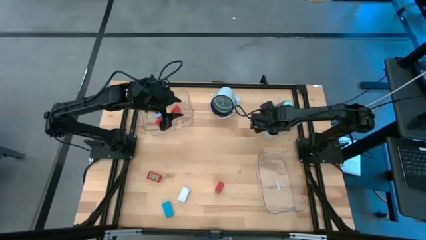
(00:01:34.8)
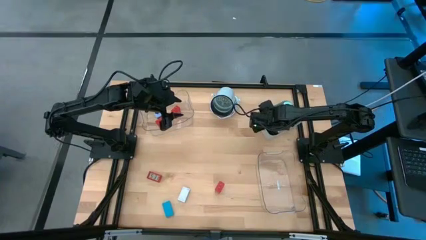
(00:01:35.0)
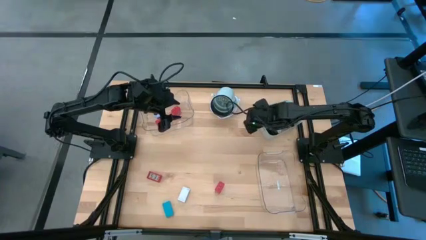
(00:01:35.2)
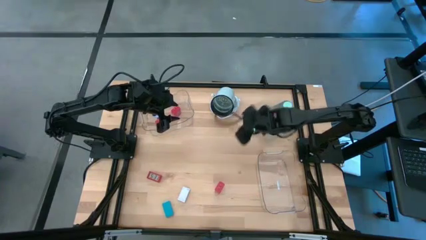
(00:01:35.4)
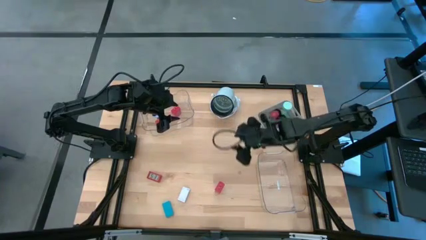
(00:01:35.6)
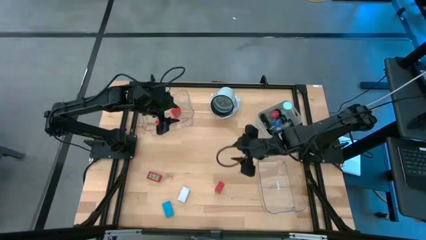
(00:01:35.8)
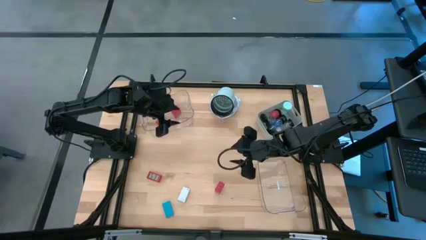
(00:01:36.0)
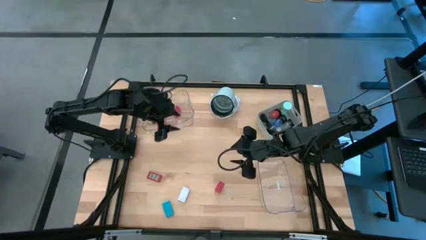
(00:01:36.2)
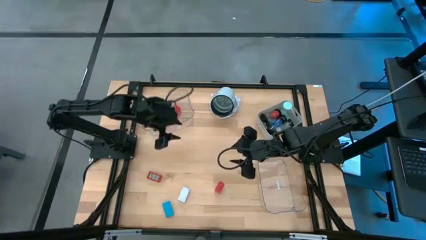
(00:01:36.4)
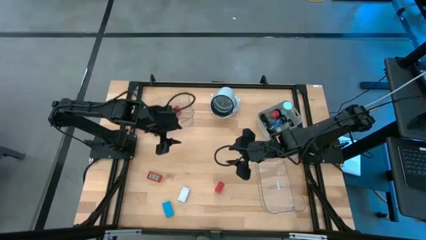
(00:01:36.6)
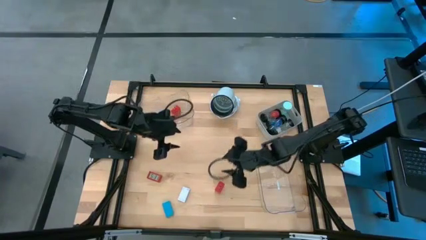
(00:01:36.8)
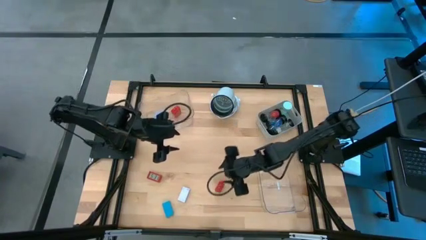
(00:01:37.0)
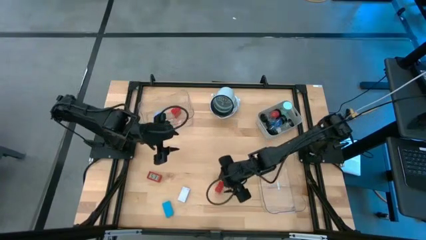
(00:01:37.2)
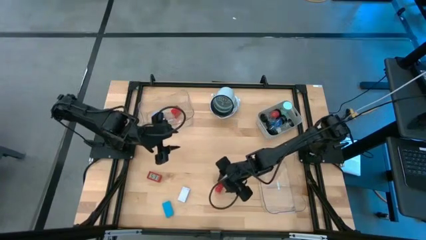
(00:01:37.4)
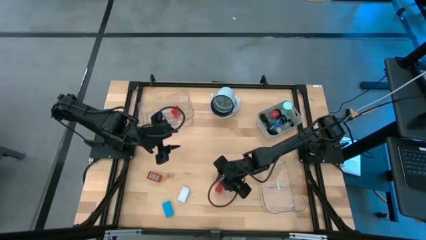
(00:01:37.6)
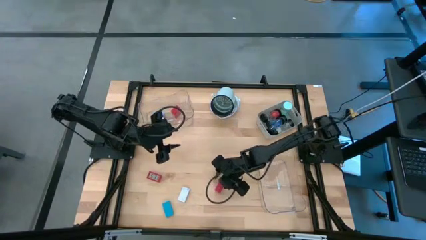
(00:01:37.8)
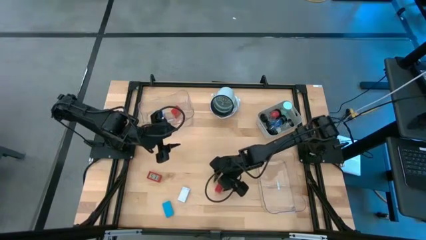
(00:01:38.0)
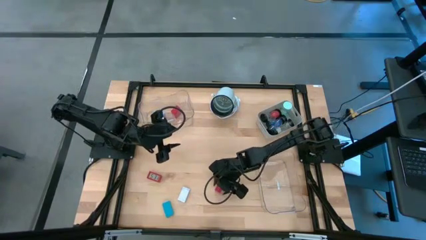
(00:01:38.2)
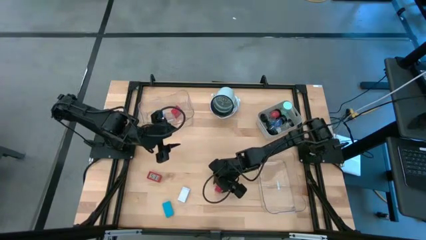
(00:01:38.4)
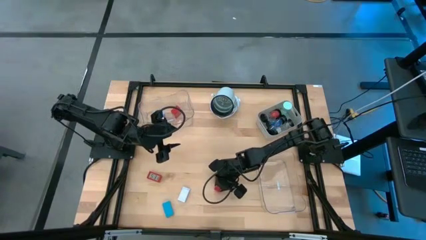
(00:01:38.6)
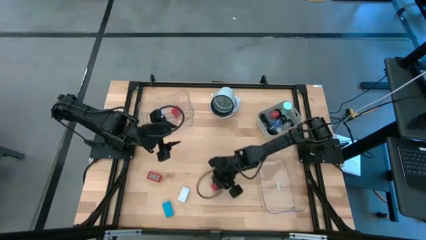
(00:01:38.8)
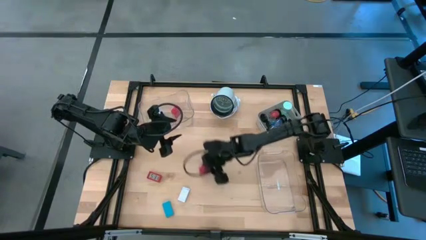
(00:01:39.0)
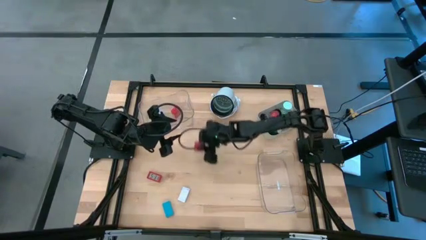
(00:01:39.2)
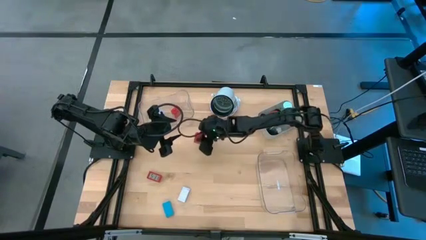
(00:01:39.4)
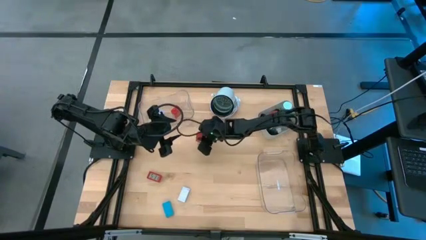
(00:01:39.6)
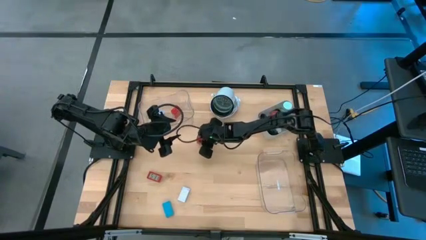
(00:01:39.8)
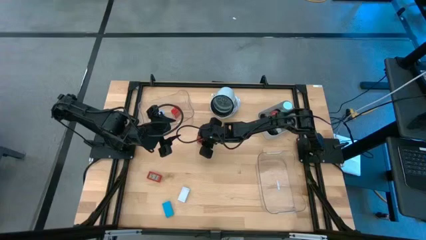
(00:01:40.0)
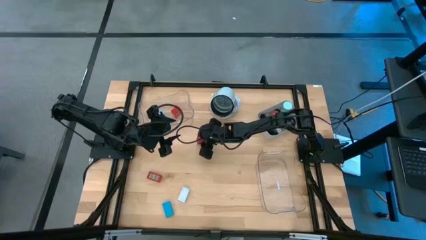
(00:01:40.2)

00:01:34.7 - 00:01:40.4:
Task: Pick & Place Office items
Move the red charger adapter to the top middle of the table

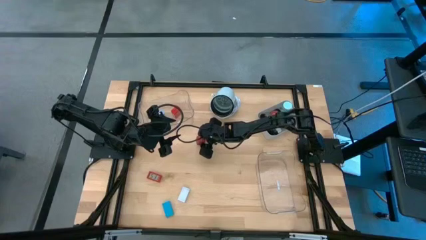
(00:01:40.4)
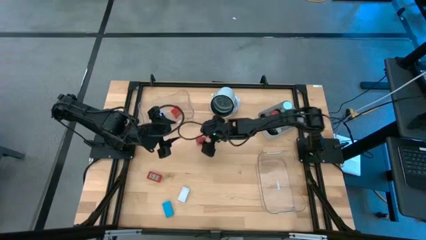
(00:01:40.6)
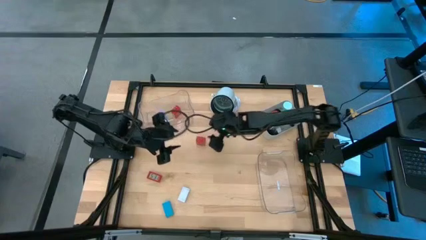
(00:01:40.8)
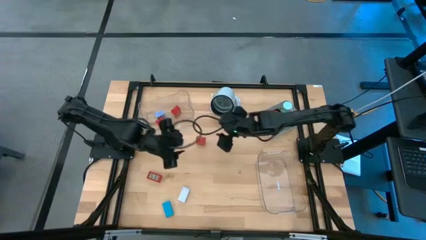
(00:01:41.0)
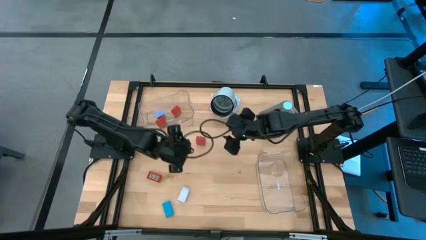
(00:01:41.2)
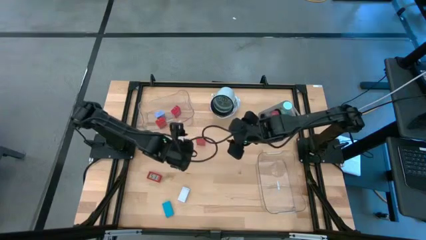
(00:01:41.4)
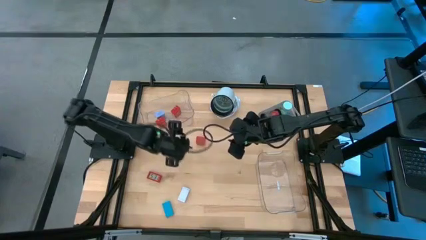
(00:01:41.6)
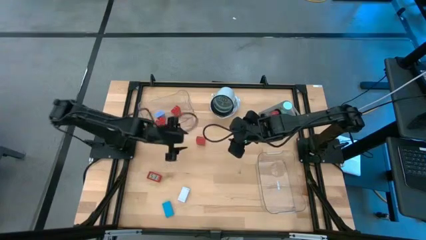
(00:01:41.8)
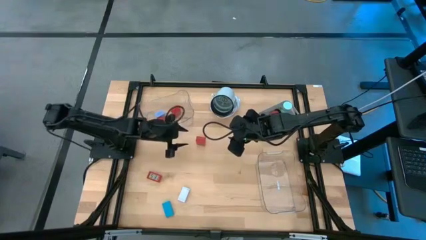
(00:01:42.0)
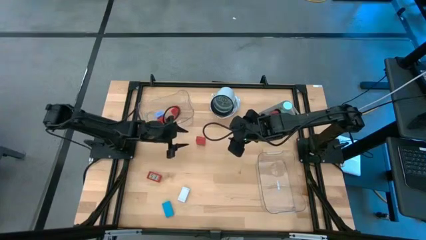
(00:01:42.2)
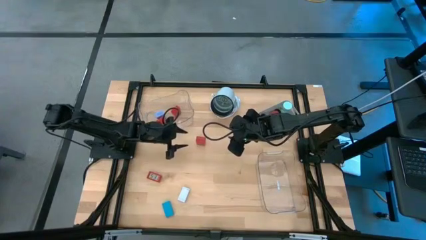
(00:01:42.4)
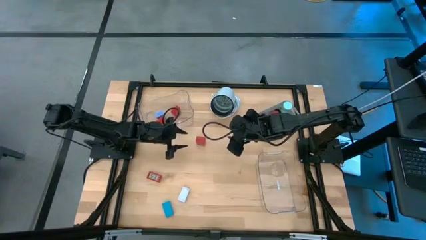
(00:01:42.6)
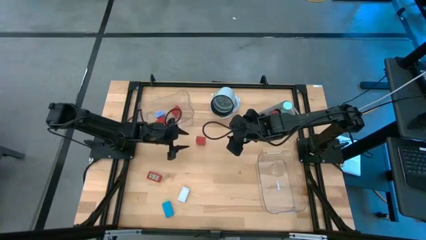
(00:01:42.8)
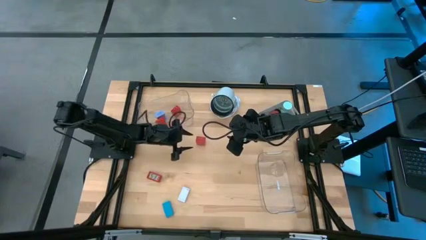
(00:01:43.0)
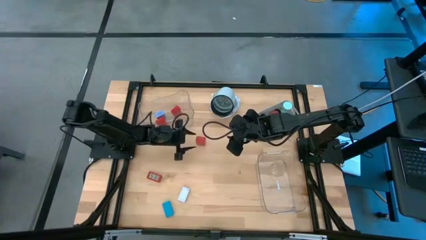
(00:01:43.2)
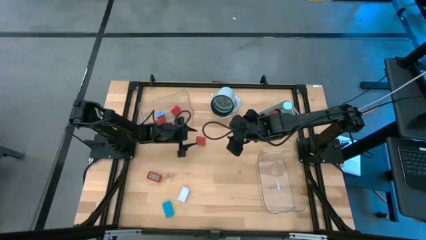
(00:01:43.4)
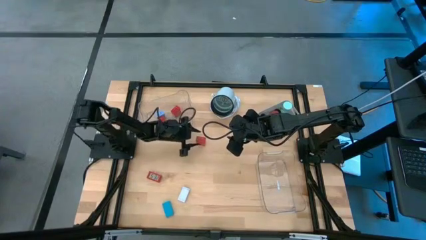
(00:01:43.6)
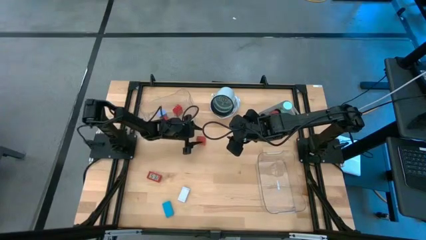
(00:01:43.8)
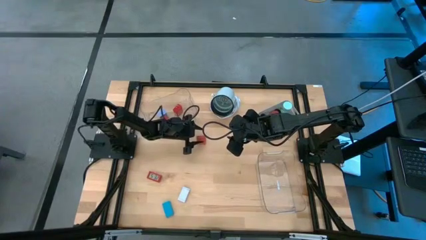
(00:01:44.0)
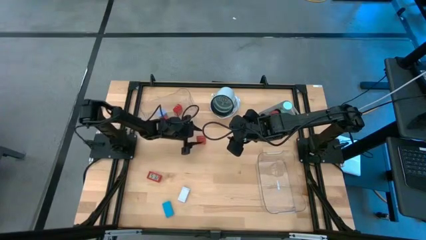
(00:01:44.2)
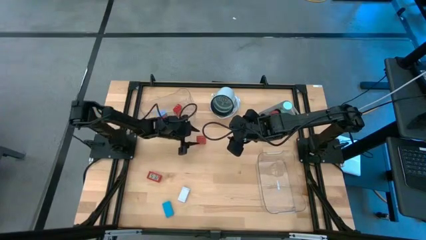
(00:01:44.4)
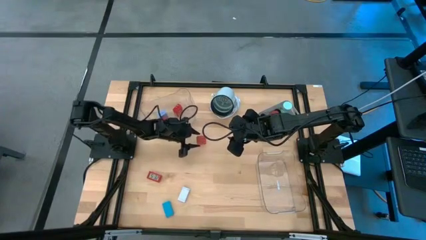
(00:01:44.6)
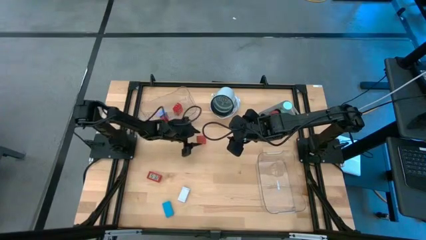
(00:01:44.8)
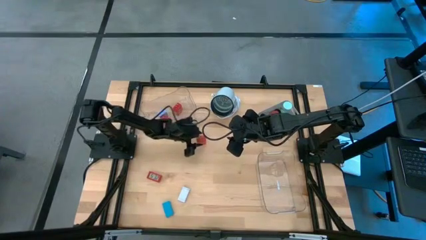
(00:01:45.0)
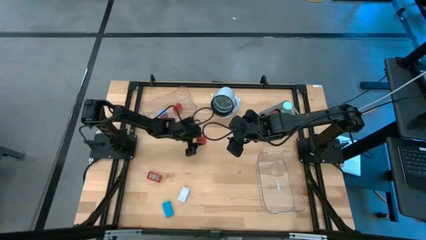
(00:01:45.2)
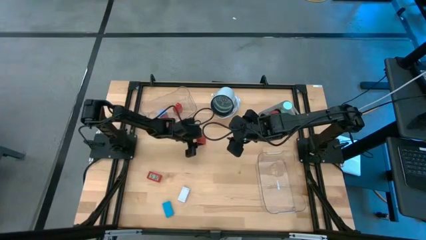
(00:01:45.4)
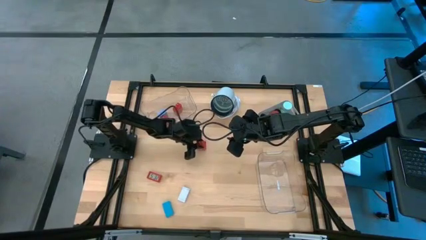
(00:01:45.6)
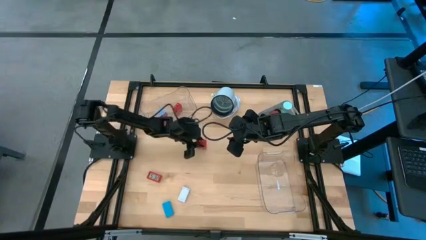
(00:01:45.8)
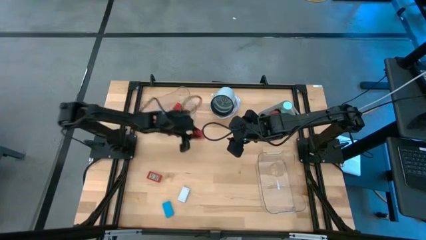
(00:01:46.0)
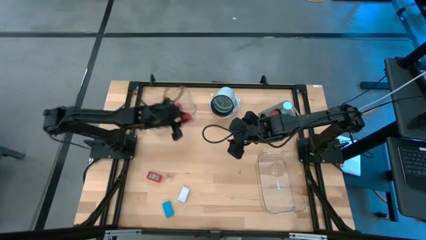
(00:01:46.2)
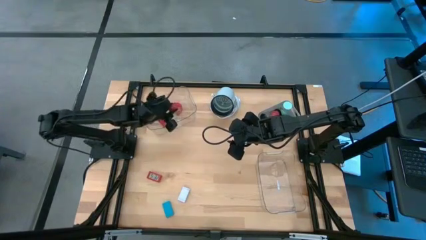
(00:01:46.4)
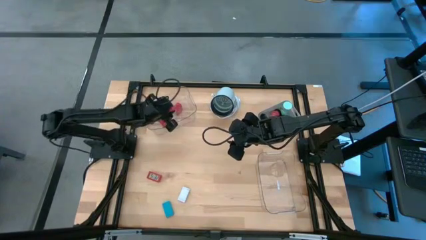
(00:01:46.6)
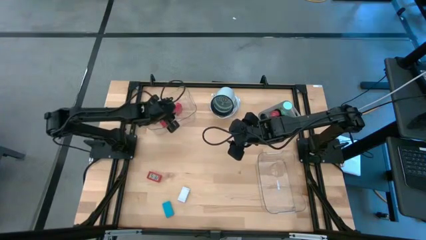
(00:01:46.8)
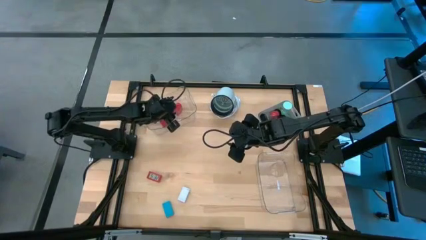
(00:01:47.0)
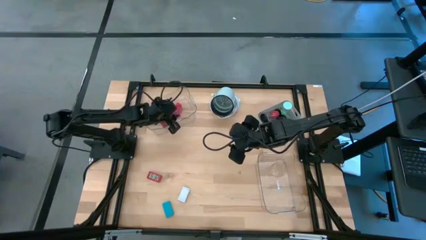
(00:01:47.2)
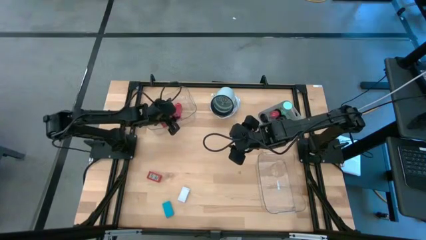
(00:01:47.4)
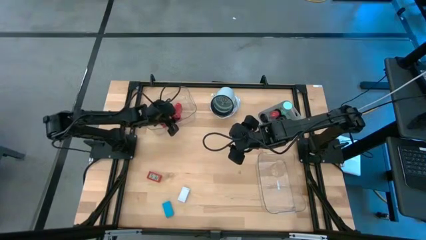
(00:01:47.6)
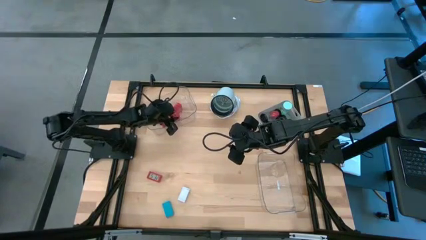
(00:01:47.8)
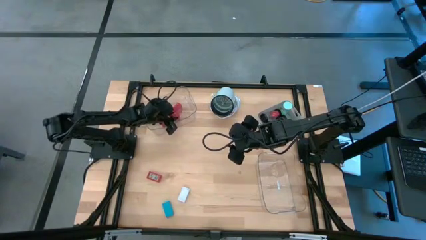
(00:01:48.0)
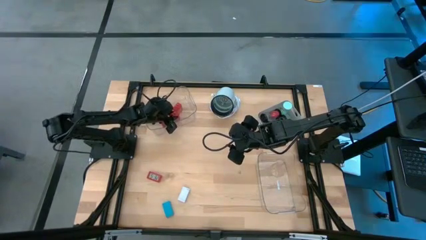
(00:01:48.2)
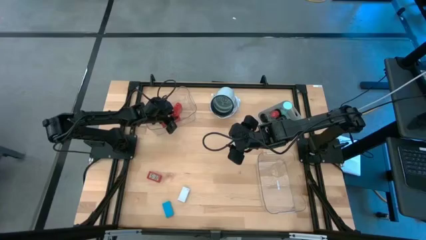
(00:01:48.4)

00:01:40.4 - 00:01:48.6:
Put the red charger adapter into the left transparent bin

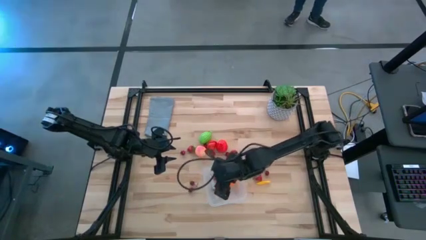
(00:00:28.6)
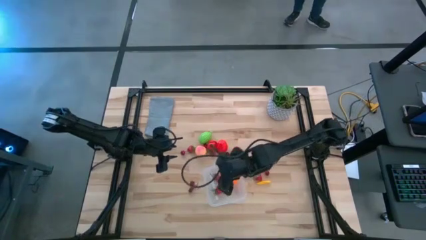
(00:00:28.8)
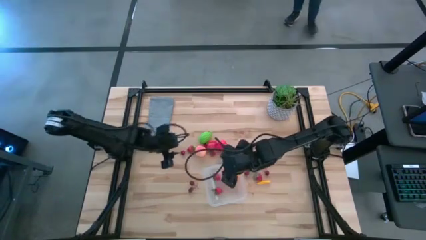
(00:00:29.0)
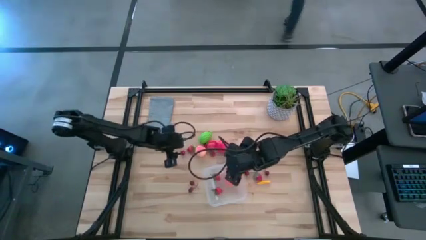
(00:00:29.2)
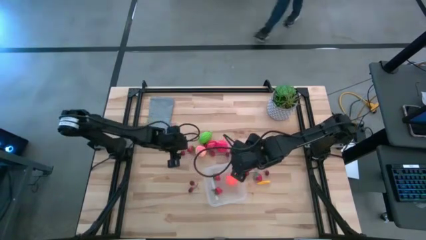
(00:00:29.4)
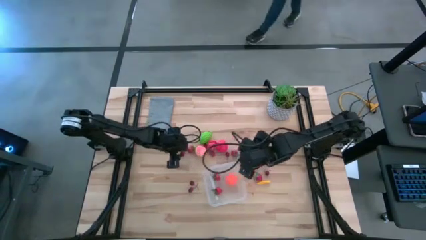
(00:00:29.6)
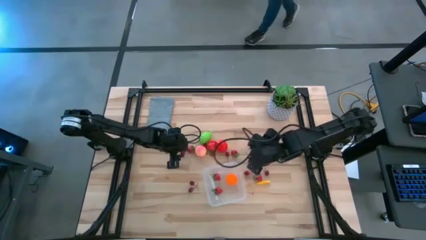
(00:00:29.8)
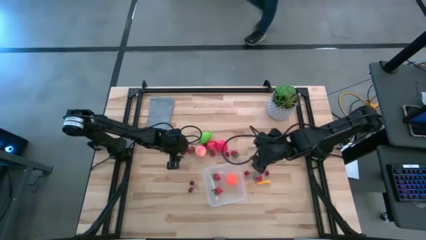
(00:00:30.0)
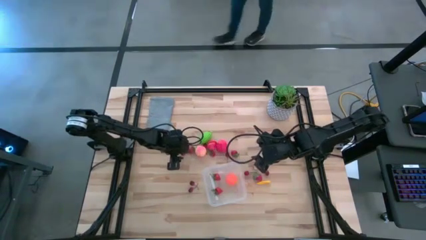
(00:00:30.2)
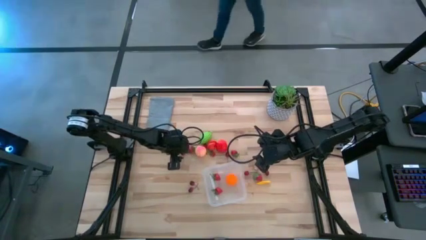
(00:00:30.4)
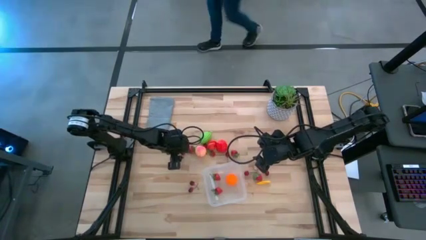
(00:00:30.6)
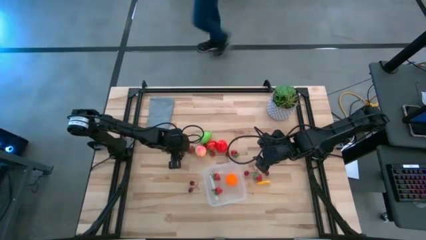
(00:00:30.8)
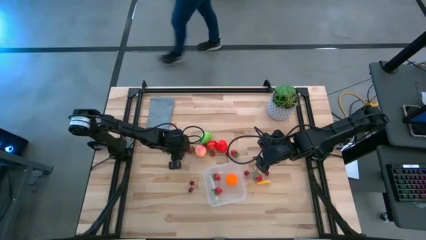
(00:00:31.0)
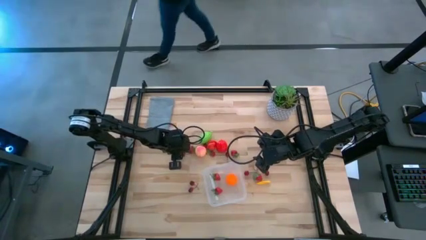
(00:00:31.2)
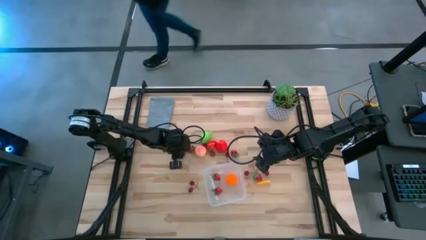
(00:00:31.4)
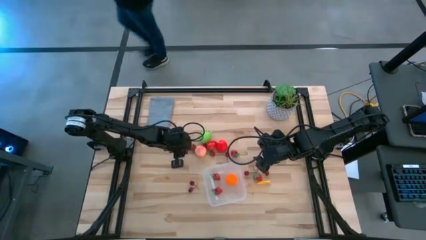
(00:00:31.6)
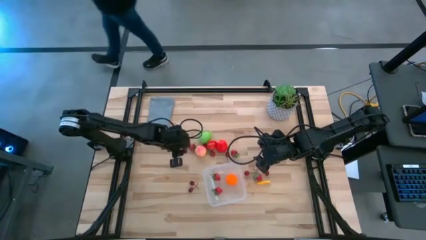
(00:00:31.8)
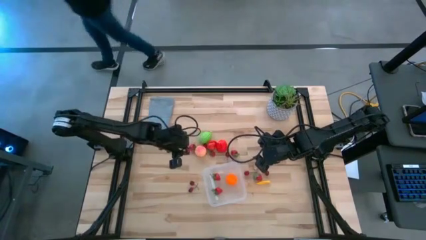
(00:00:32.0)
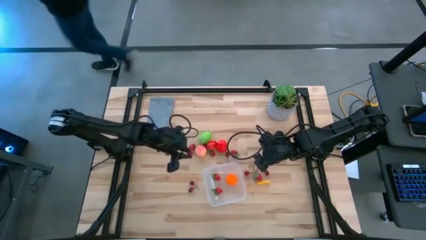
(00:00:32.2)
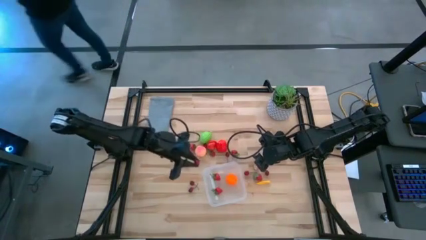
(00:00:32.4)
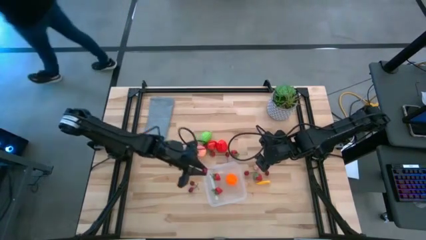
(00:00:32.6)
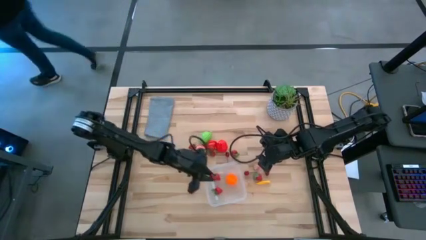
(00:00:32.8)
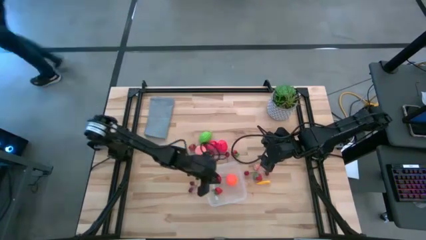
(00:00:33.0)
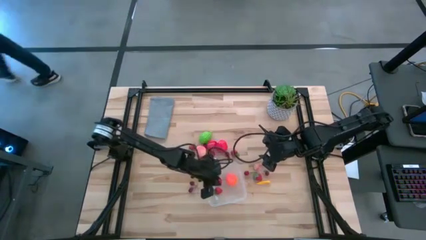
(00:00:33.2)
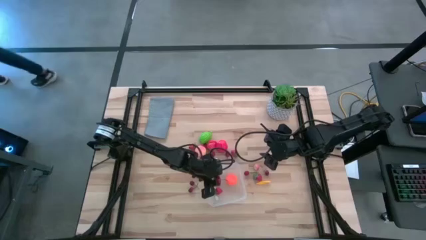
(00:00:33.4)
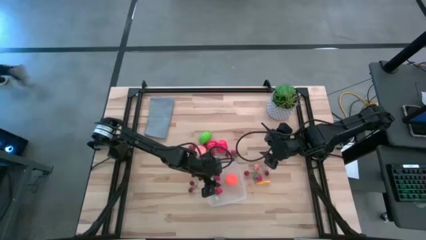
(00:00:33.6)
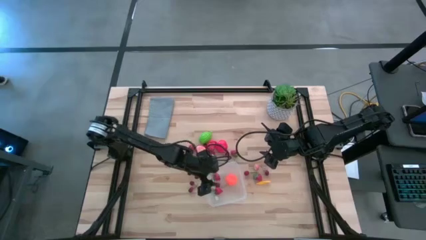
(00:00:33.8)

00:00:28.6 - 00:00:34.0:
Task: Pick and placing Produce into tupperware
Put the red cherry into the transparent bin
